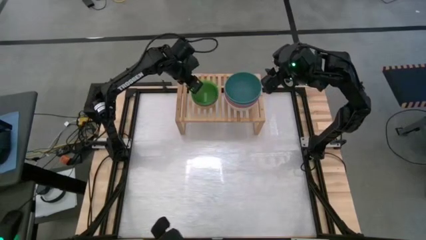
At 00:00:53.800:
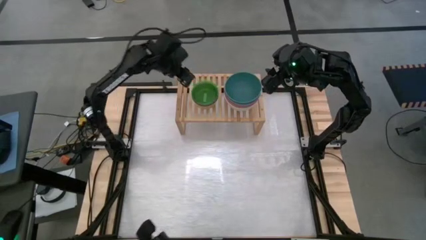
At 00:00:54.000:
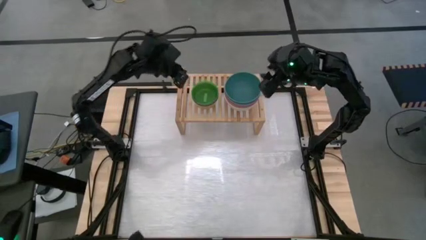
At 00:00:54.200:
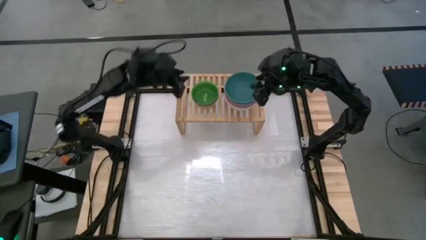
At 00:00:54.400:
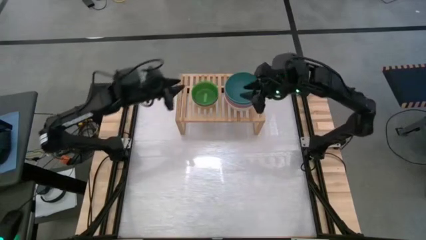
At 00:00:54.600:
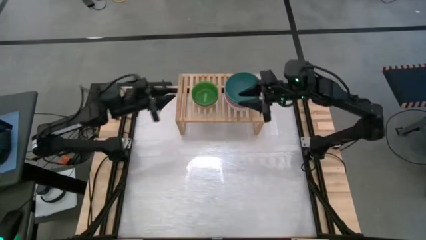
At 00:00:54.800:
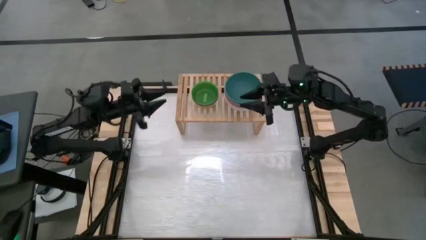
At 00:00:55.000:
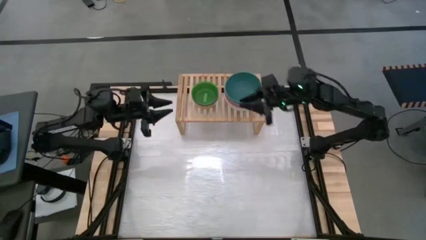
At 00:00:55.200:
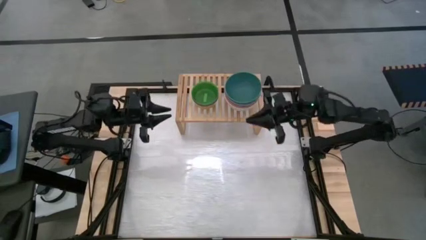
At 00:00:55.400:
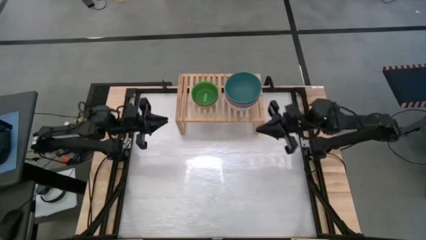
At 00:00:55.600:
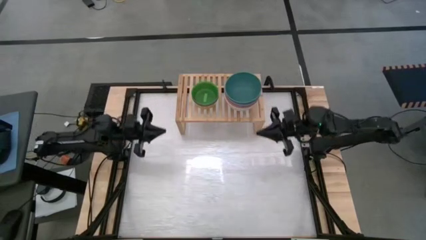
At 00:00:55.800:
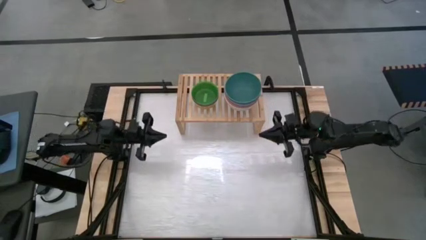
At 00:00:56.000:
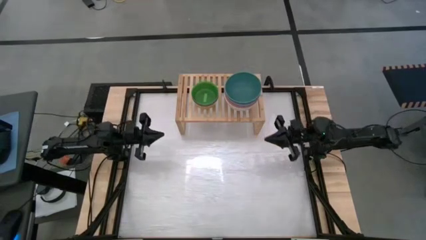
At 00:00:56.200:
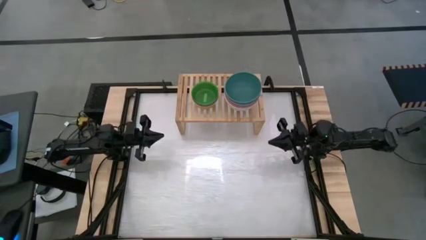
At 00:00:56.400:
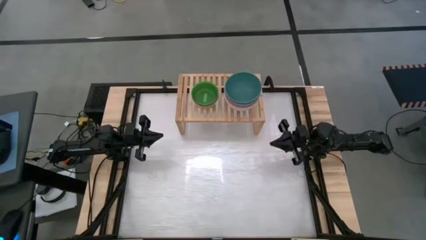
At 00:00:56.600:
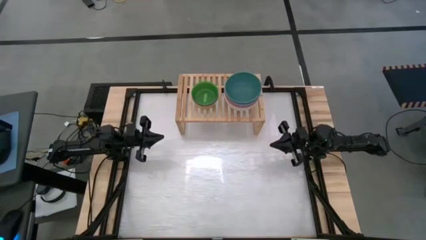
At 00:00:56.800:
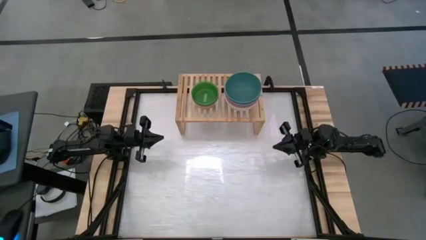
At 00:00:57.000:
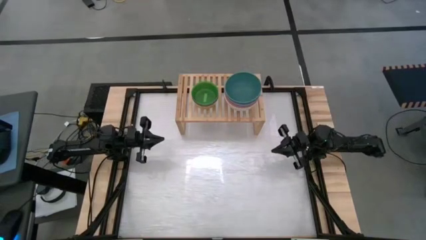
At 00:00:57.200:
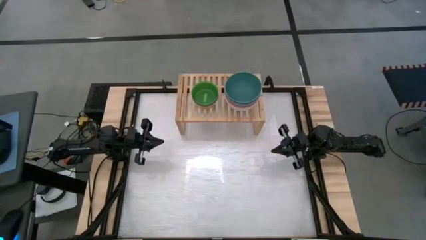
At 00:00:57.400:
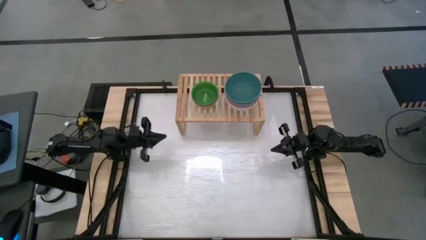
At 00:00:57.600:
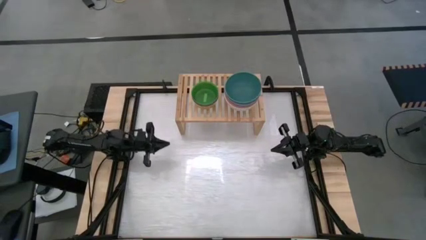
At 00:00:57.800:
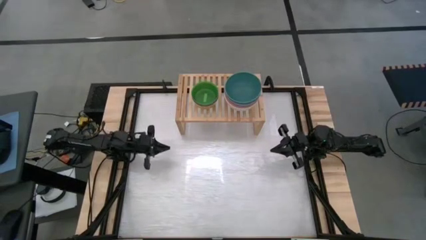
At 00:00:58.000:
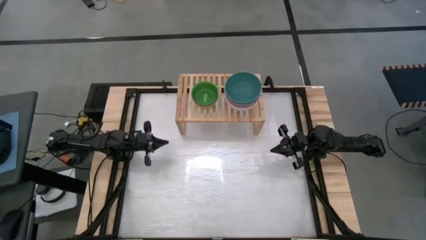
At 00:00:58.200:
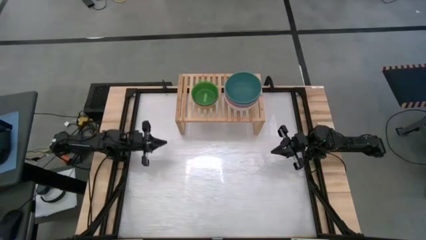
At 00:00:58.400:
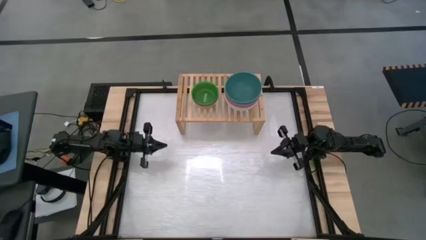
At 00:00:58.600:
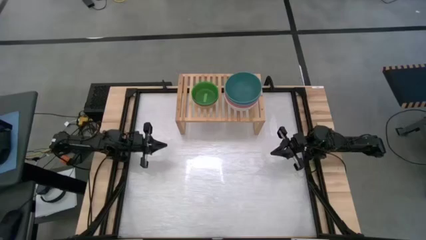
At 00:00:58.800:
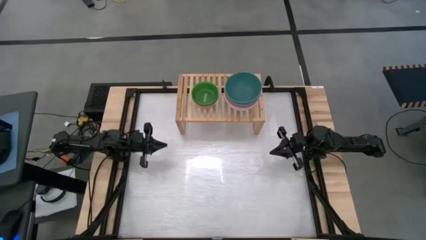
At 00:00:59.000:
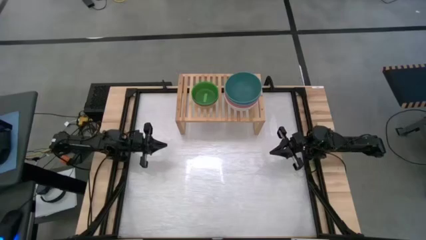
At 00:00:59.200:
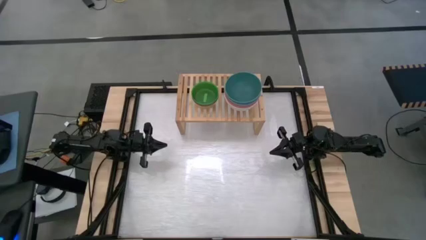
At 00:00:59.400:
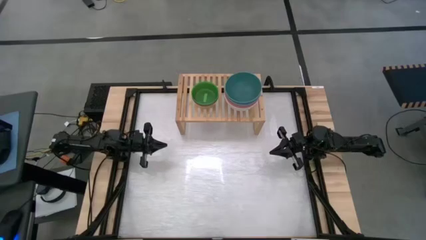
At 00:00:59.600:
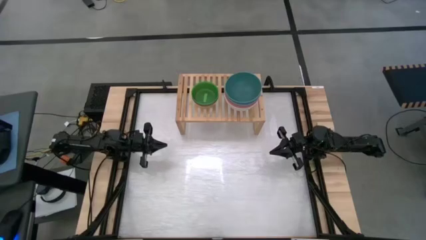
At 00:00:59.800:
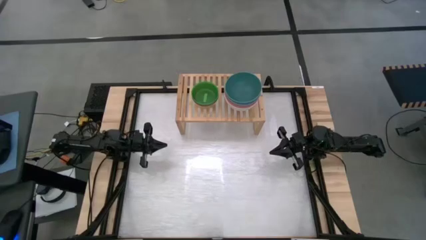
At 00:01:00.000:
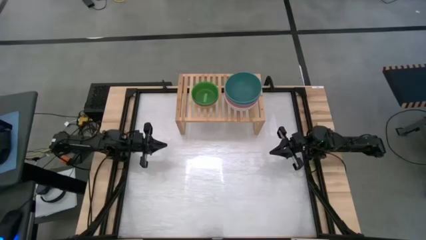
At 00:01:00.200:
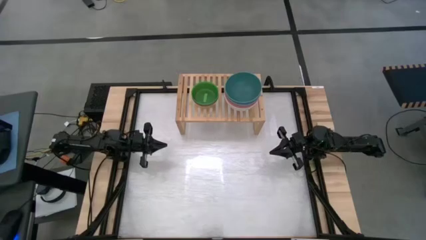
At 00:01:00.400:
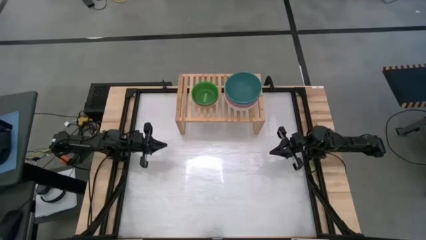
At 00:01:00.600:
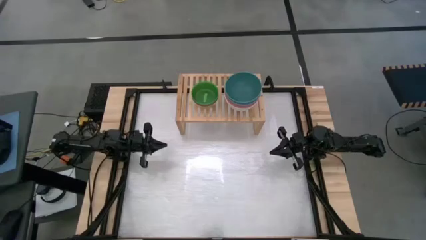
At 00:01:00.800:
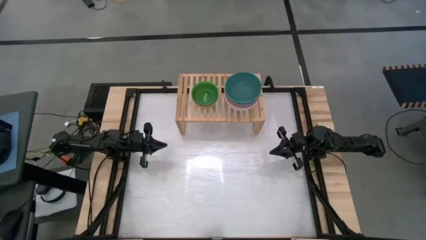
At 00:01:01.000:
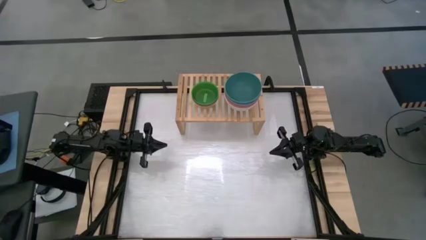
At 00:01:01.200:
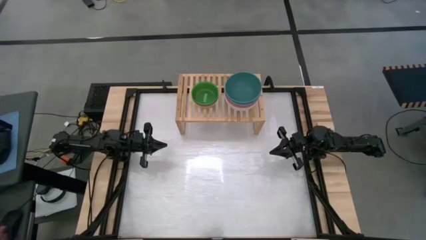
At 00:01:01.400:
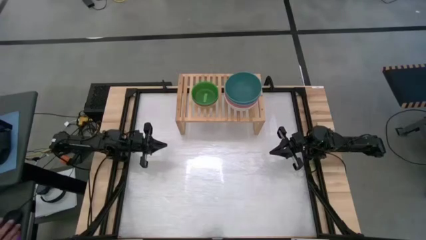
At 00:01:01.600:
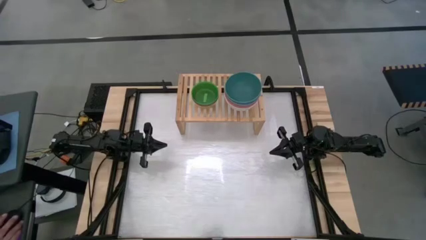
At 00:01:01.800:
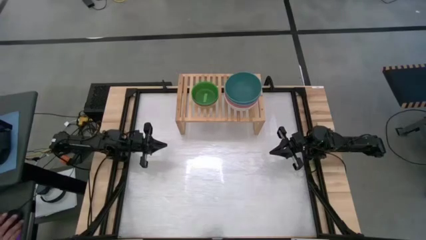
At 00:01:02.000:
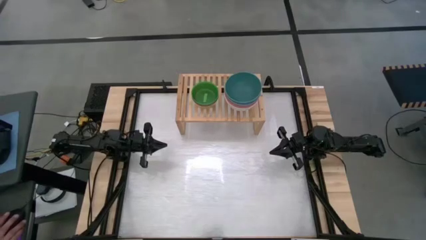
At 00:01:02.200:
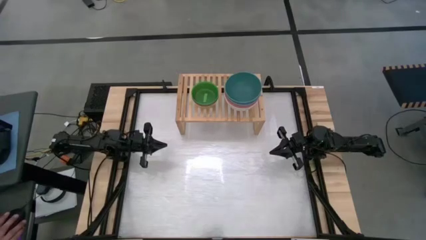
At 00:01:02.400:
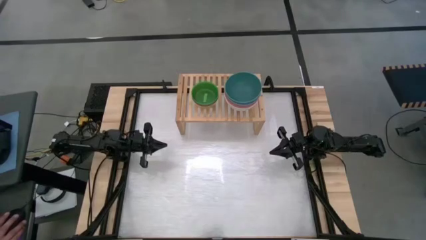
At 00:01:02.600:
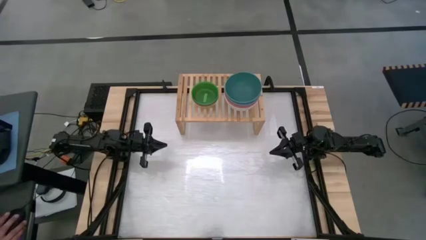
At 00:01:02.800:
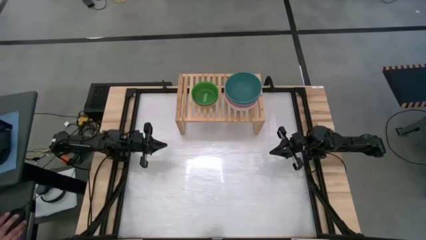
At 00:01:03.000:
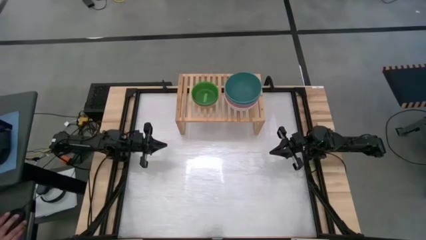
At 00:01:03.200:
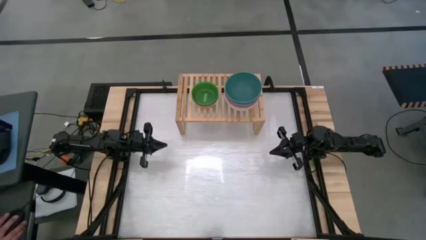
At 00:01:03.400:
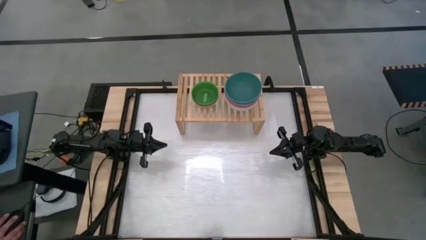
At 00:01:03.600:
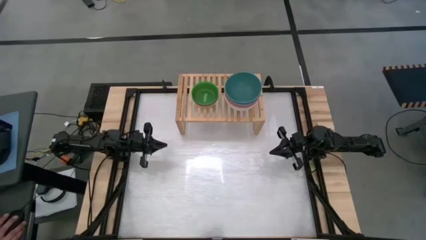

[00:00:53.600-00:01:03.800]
Task: Place and stack bowls onto a shelf
Return to Home Position

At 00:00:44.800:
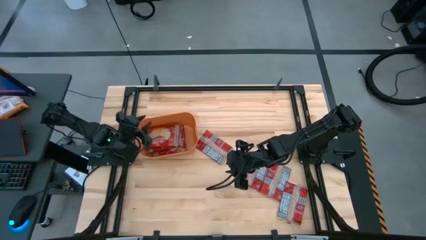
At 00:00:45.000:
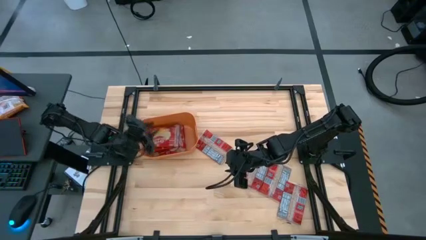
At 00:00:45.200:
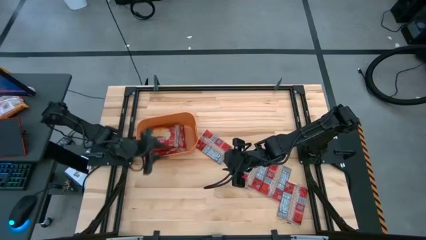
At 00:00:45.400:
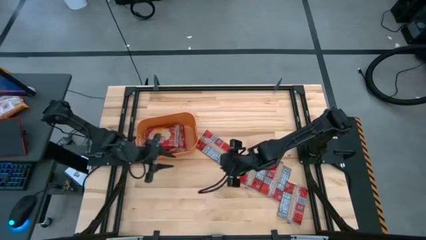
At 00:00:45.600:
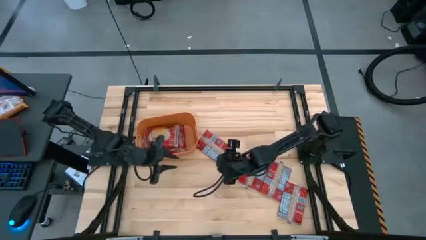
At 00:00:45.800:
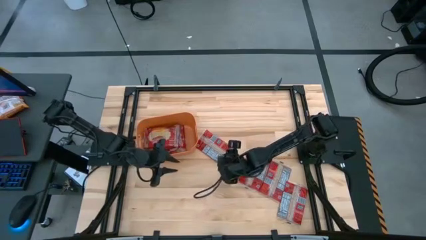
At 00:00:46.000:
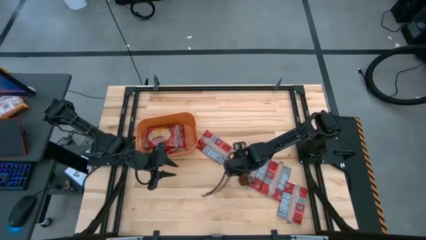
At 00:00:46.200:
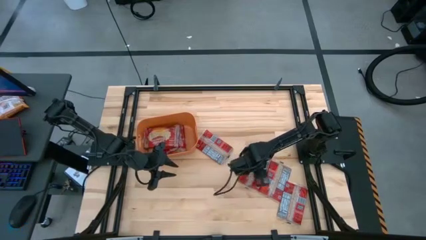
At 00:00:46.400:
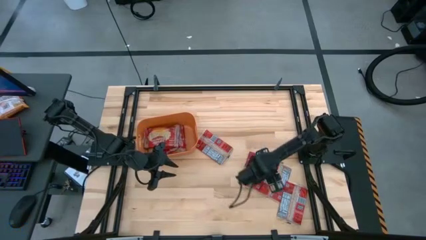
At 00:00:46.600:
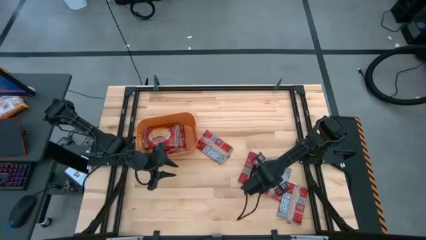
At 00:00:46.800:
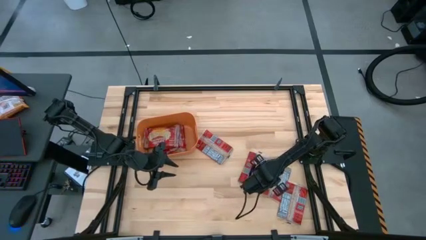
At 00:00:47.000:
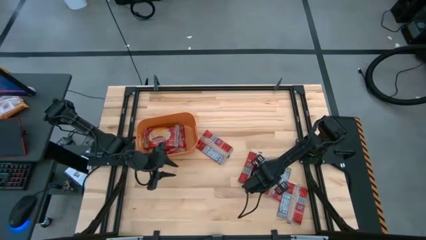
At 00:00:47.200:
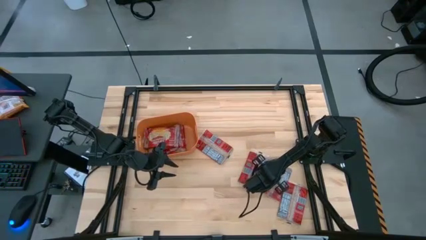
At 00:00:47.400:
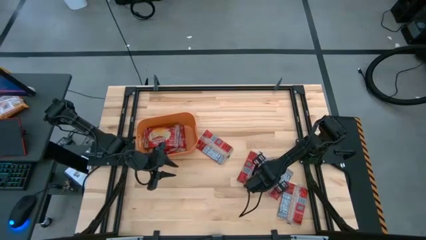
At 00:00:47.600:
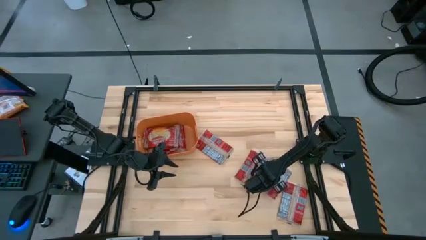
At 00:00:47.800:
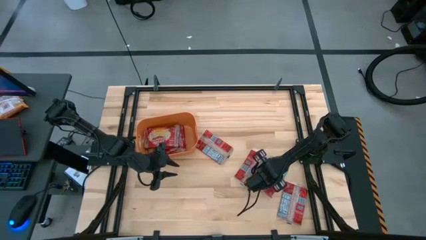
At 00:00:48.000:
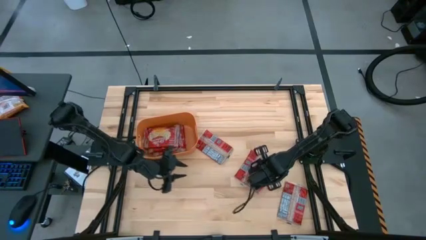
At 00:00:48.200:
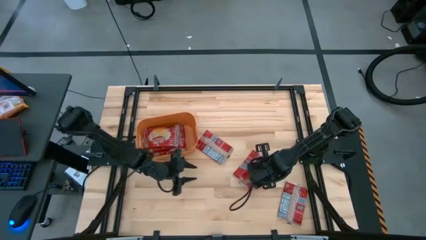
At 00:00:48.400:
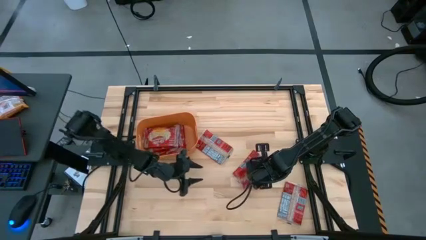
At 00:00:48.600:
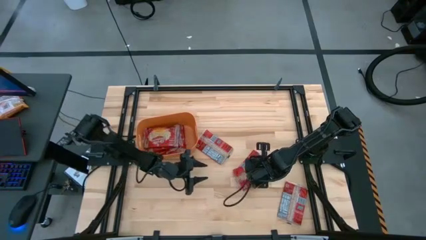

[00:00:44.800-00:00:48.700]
Task: Sort popcorn bags into baskets
Put the red popcorn bag into the orange bin
